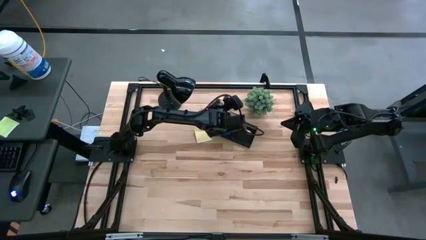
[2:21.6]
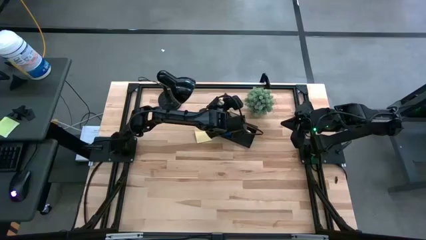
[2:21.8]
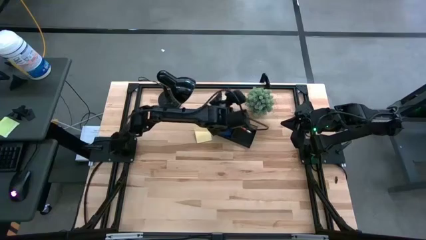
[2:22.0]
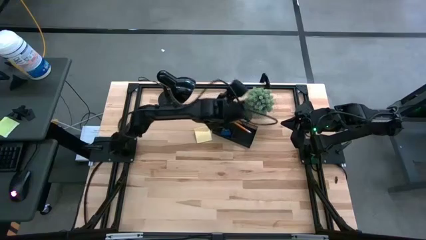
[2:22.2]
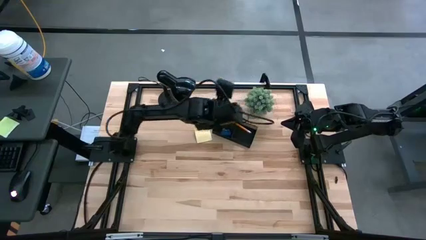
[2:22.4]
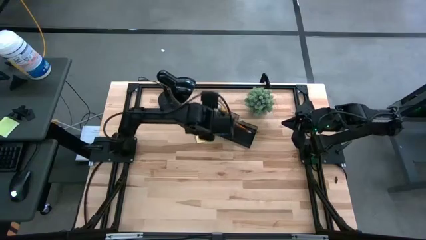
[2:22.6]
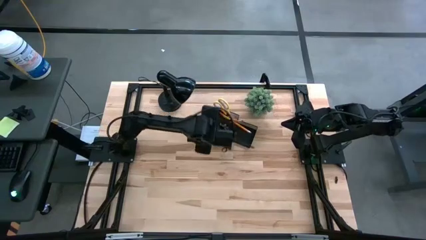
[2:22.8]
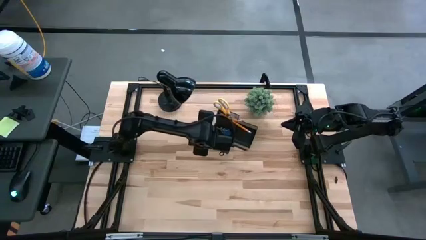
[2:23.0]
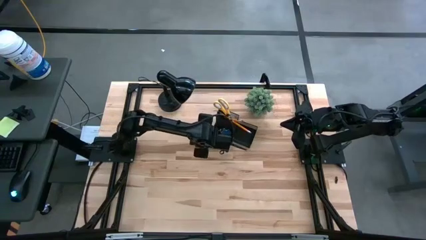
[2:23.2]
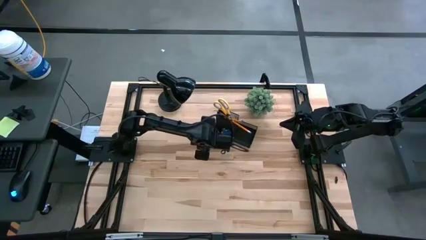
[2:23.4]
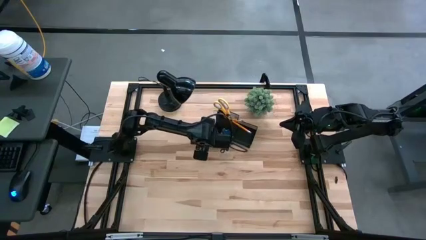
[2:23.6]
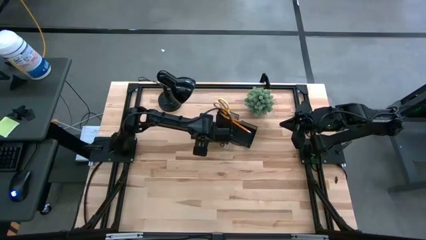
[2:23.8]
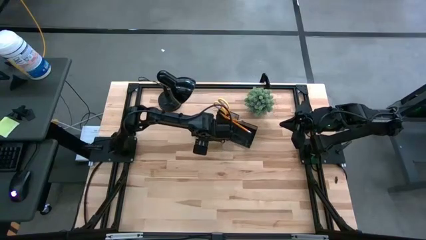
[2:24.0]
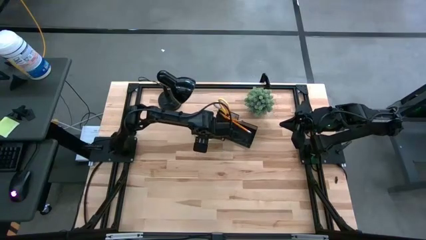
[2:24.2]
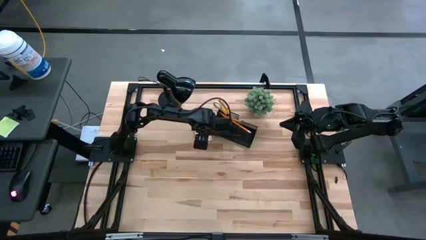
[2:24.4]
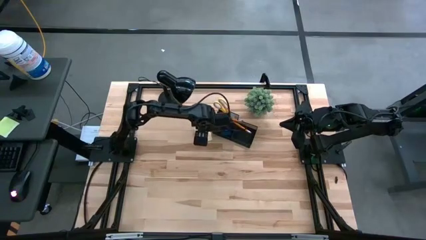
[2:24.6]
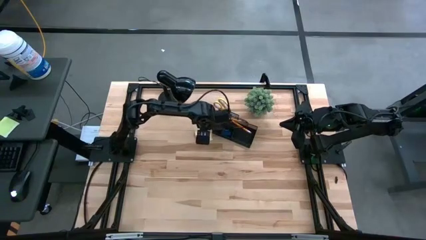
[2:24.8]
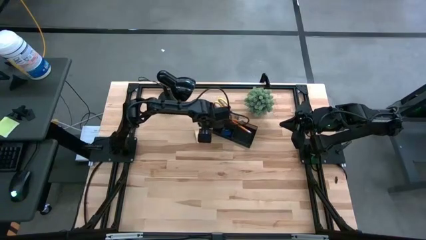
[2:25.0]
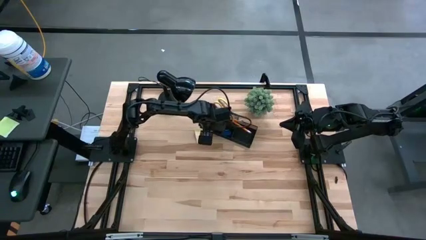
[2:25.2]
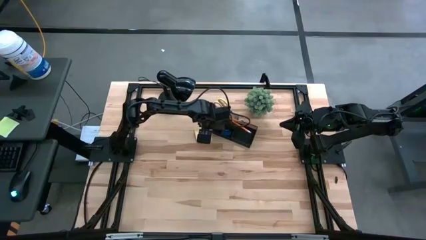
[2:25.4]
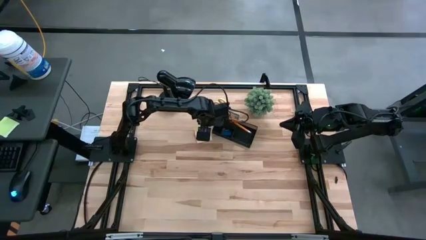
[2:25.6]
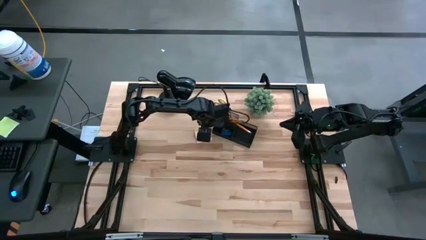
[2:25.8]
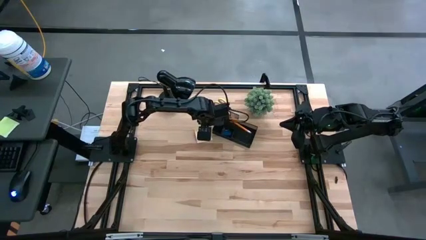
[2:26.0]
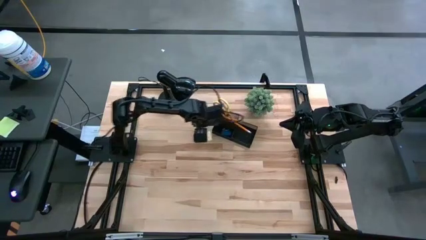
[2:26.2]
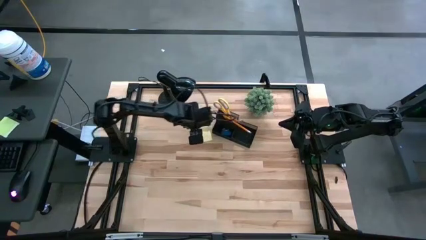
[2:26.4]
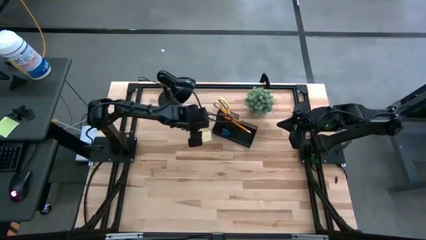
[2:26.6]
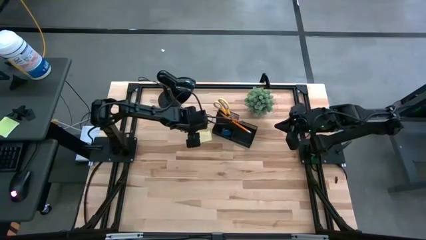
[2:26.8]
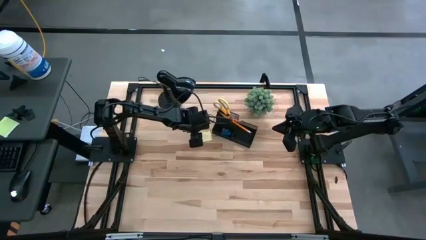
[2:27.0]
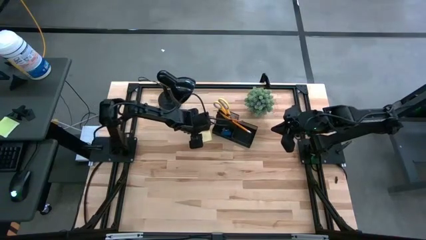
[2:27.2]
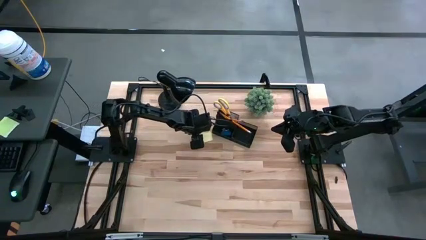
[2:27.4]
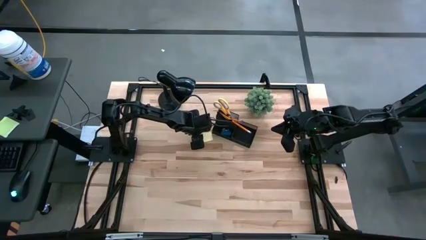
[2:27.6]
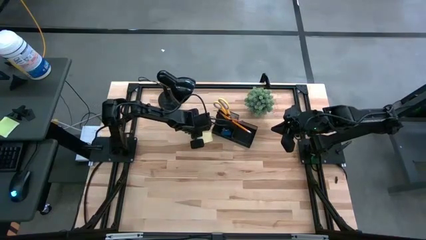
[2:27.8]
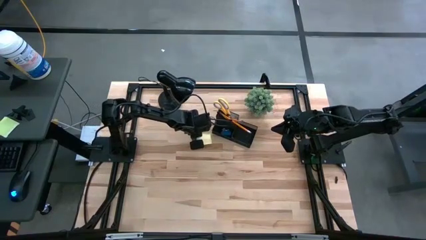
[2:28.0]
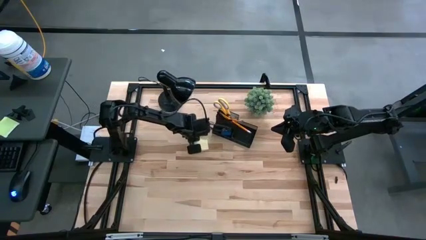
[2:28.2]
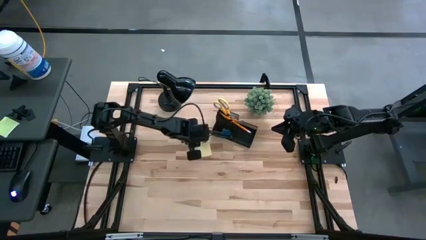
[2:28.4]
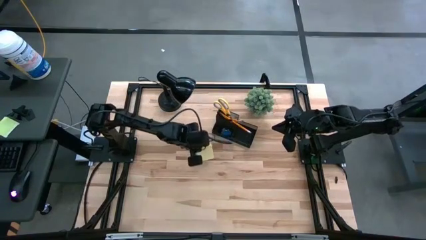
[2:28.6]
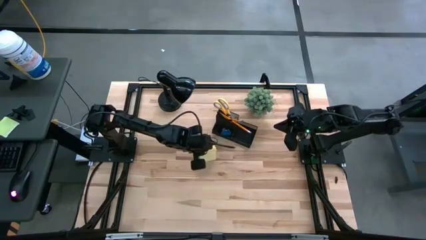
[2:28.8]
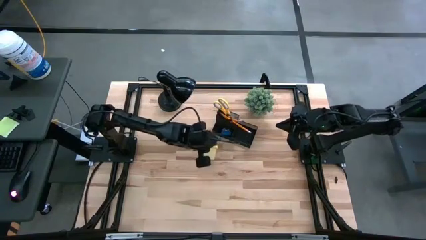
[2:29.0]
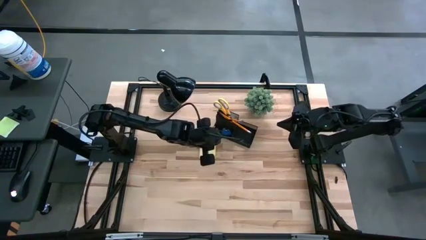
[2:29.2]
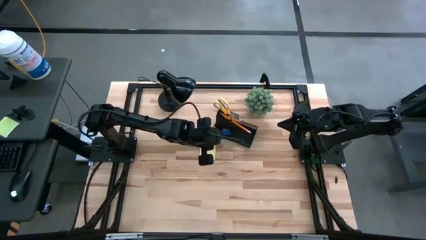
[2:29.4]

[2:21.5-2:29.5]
Task: Pick and place office supplies into organizer
Put the sticky notes into the desk organizer

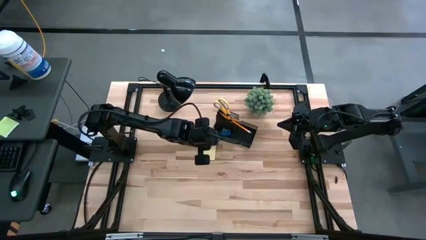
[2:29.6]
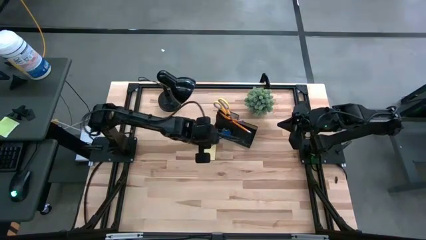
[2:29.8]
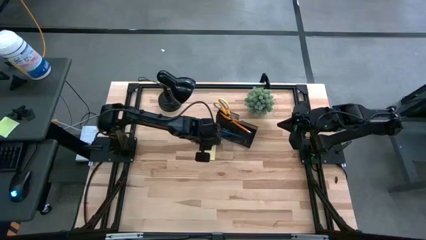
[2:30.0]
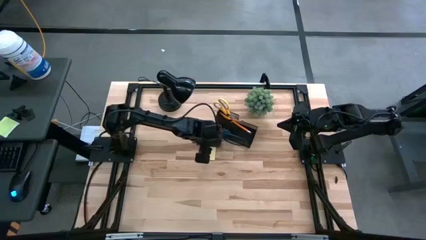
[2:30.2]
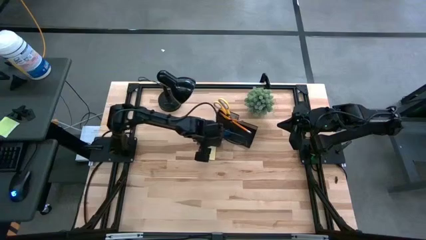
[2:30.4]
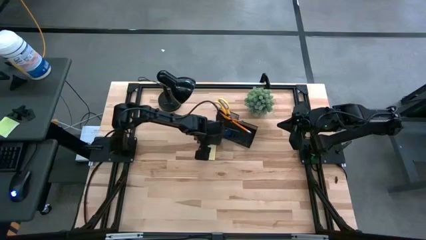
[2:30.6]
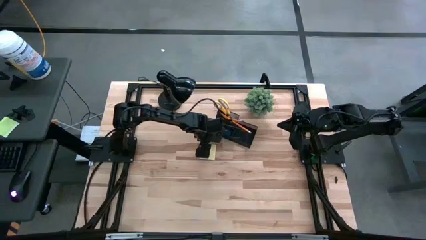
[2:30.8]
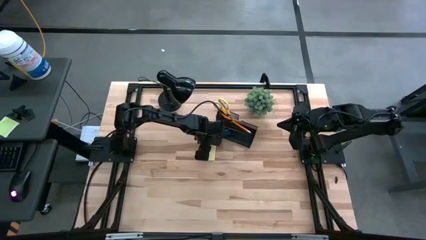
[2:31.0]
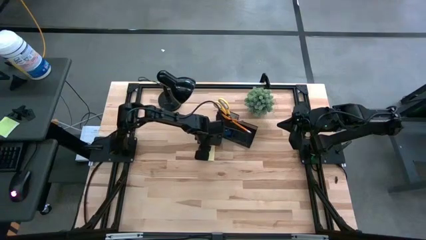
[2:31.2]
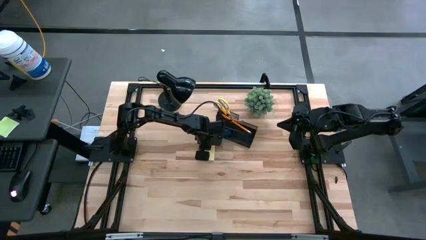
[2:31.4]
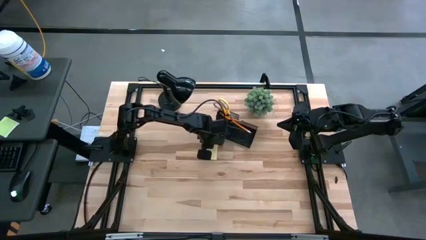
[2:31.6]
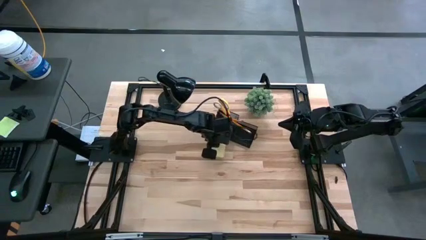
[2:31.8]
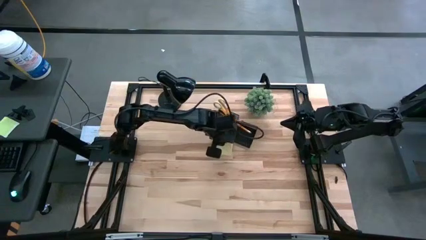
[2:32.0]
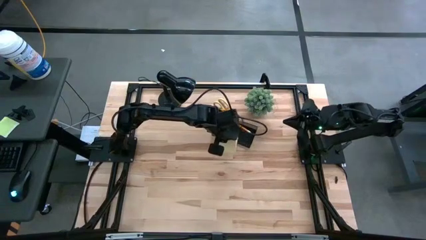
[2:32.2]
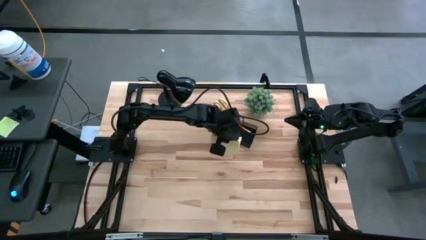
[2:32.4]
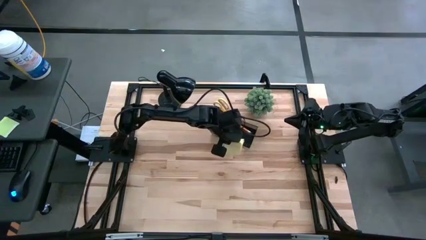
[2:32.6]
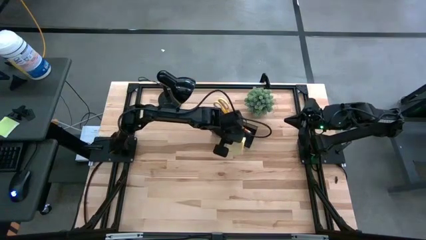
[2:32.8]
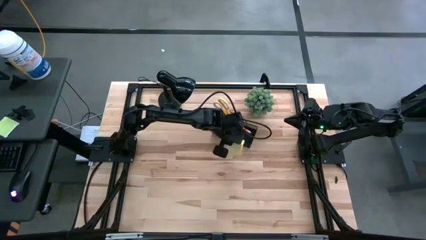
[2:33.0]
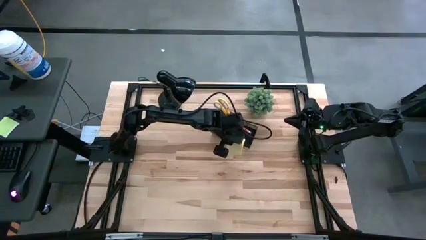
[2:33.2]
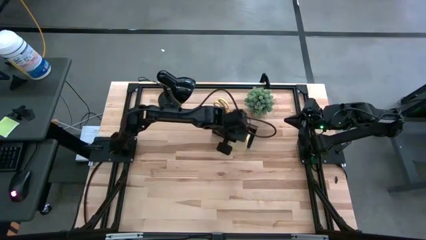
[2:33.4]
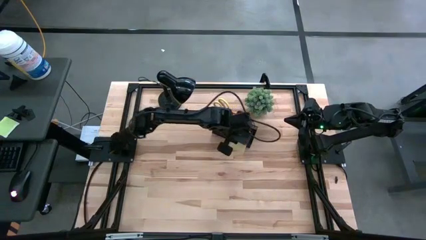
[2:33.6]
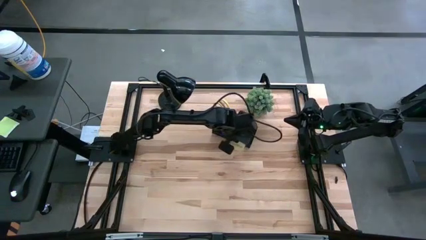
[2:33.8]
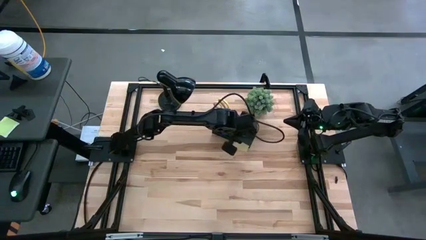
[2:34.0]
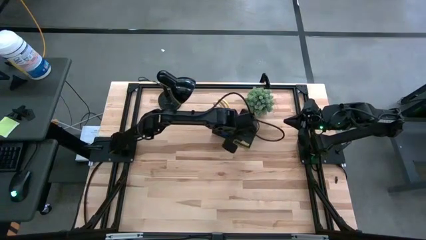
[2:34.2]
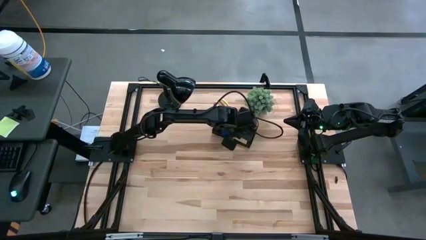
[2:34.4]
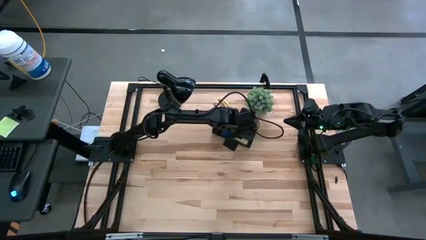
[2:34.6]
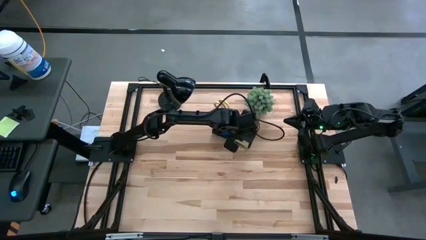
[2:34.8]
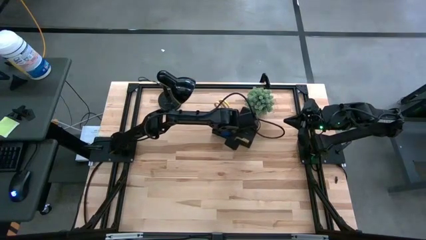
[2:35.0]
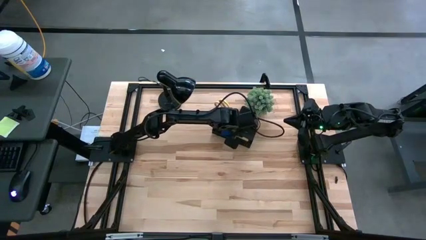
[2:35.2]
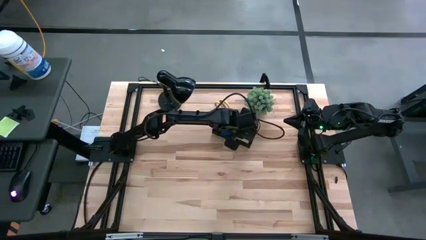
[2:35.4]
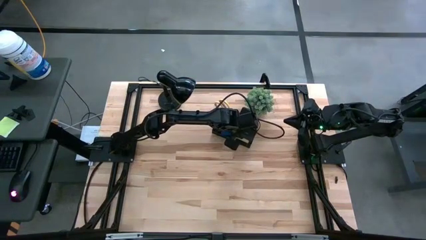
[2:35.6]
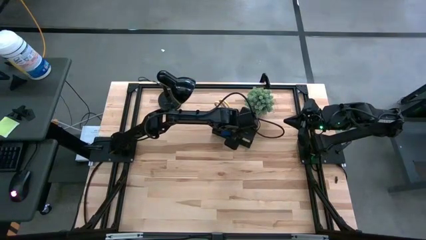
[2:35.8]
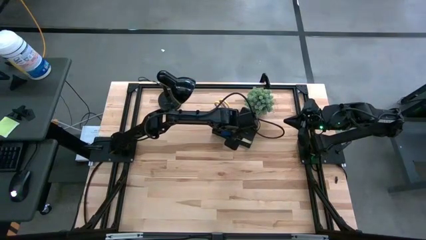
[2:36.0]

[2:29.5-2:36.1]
Put the sticky notes into the desk organizer

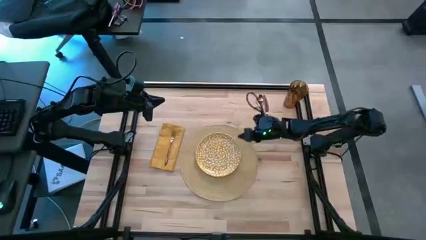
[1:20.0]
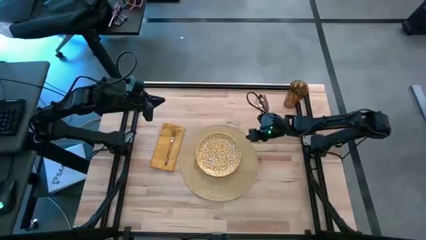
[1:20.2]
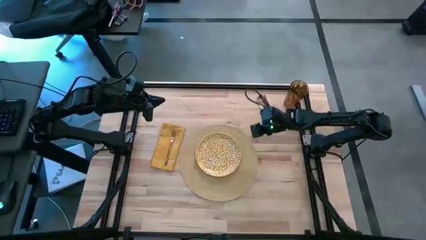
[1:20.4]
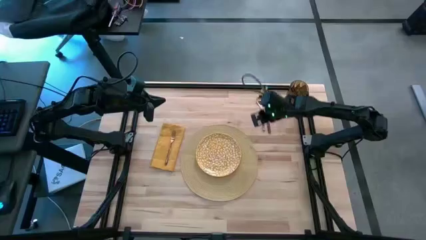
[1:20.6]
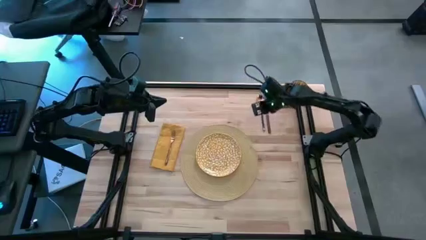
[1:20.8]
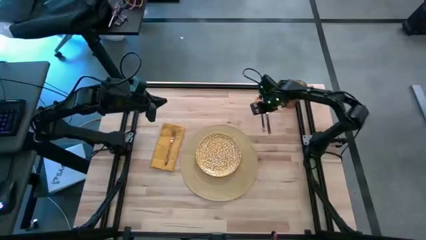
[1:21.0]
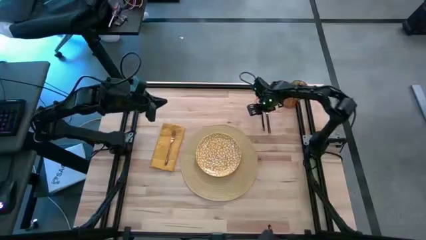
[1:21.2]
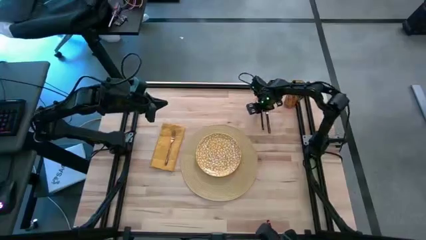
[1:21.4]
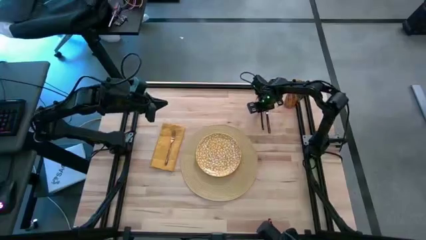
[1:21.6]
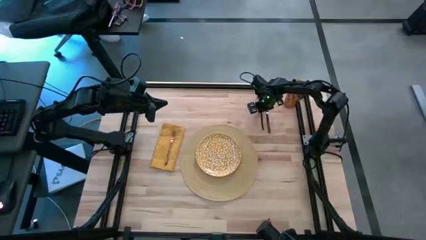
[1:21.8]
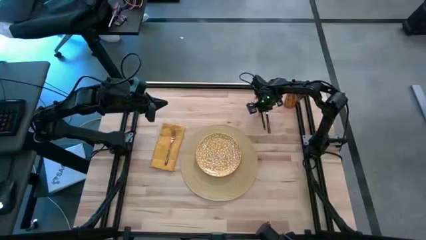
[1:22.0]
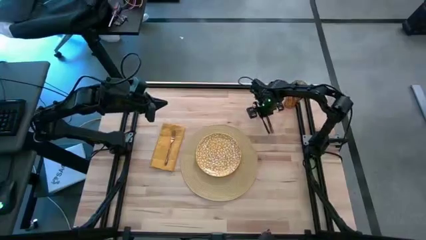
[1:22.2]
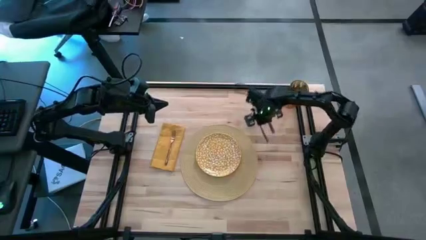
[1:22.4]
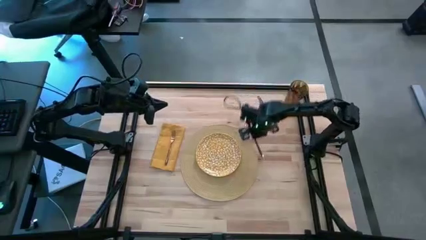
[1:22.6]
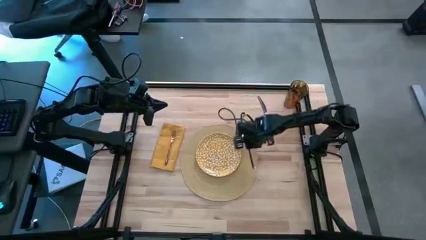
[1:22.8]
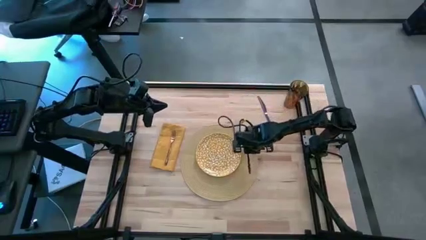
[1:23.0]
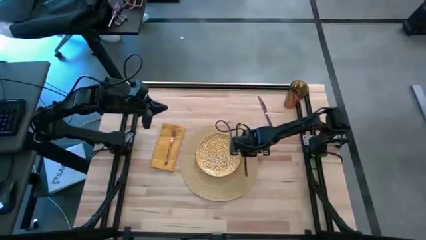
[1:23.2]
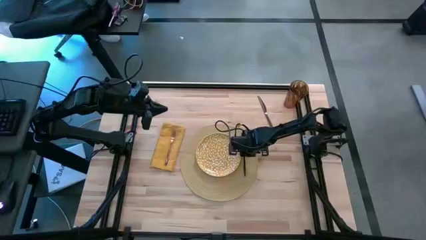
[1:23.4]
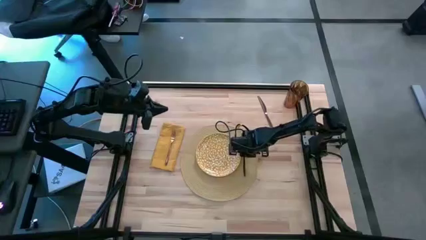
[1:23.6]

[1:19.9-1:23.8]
Task: Set table place
Put the brown spoon on the brown placemat
